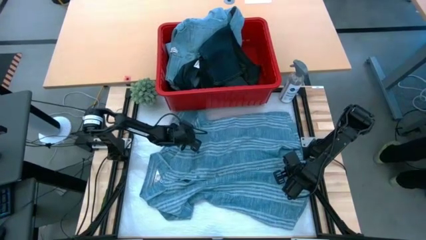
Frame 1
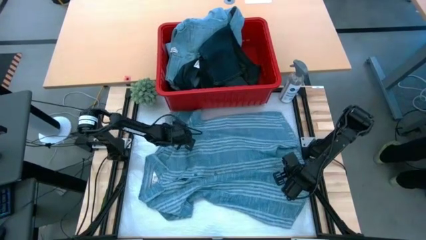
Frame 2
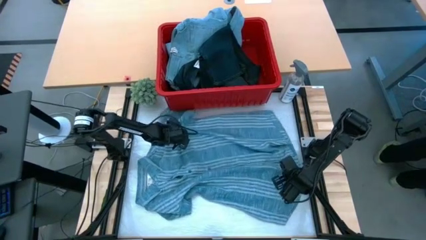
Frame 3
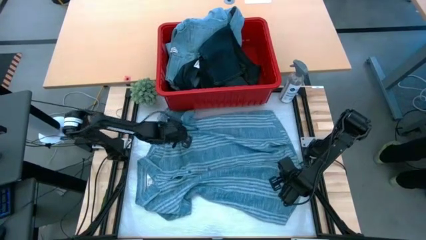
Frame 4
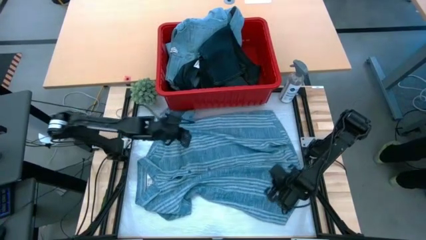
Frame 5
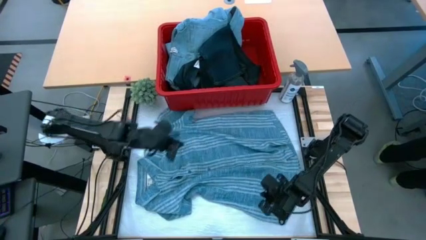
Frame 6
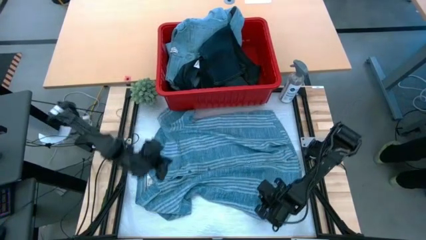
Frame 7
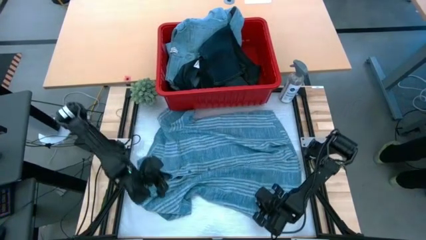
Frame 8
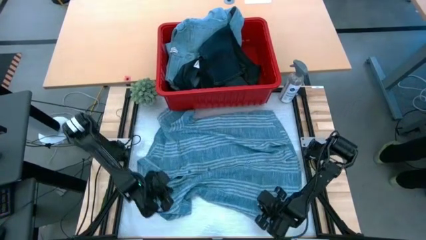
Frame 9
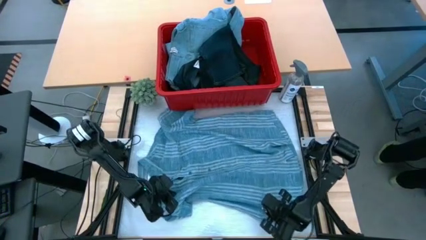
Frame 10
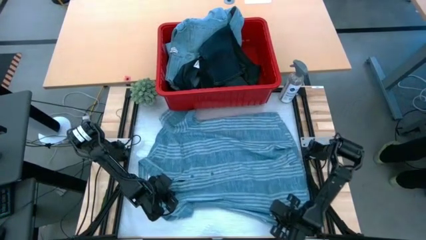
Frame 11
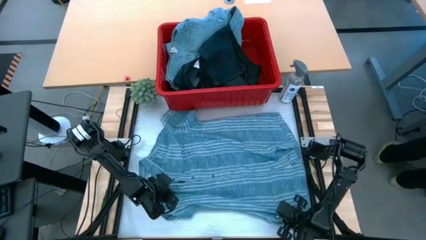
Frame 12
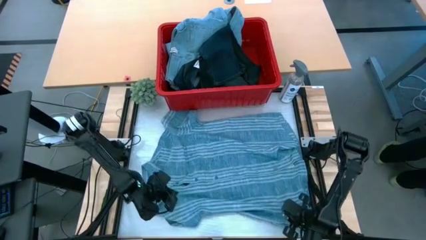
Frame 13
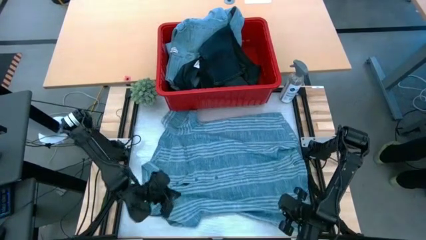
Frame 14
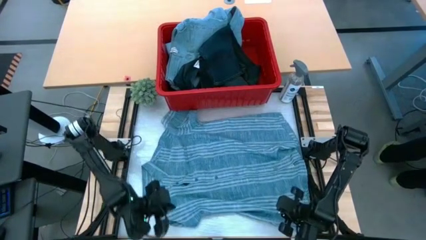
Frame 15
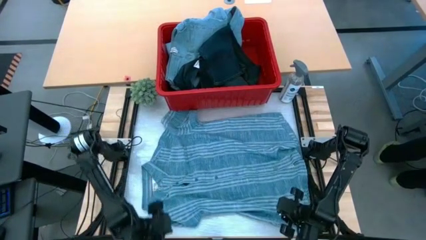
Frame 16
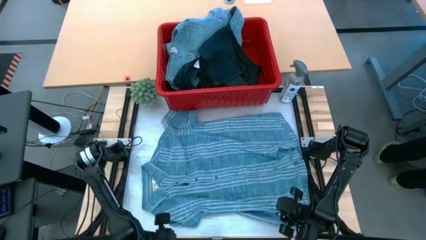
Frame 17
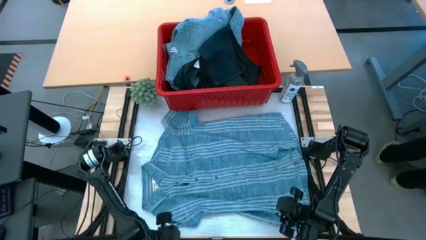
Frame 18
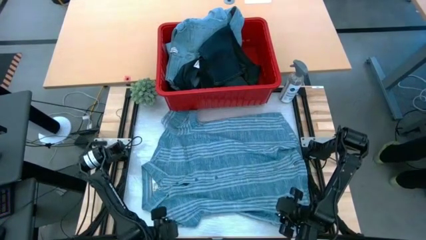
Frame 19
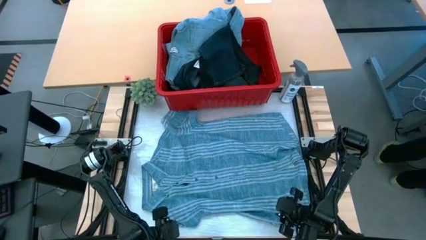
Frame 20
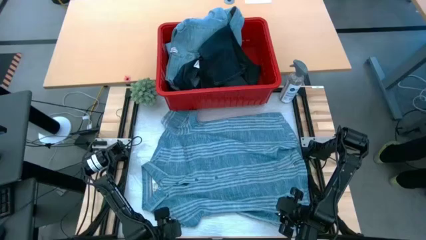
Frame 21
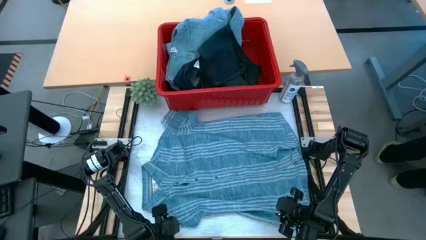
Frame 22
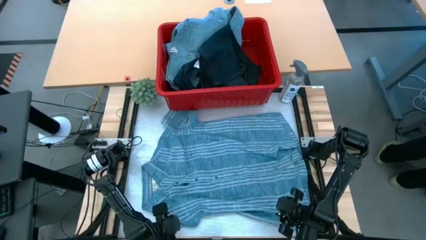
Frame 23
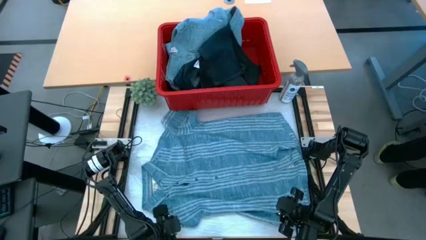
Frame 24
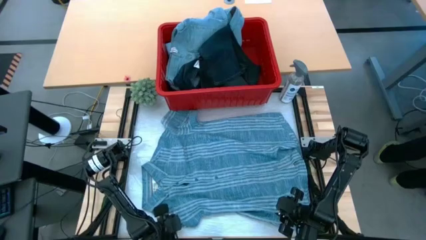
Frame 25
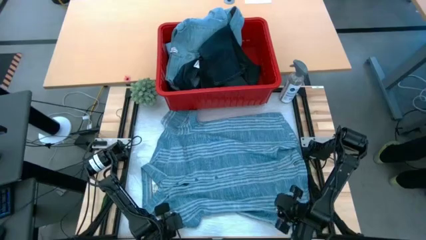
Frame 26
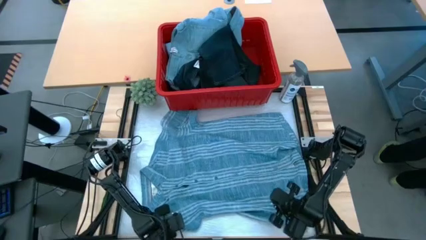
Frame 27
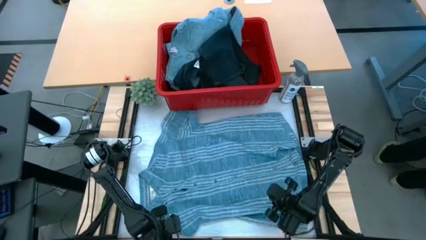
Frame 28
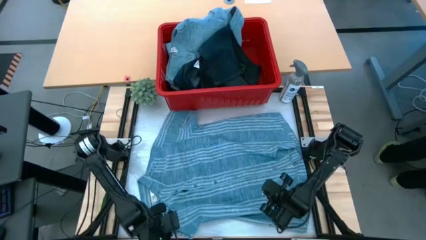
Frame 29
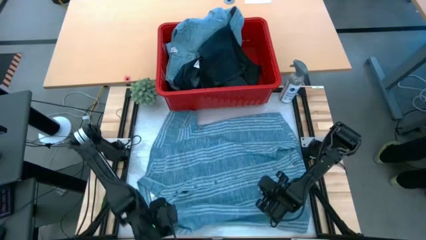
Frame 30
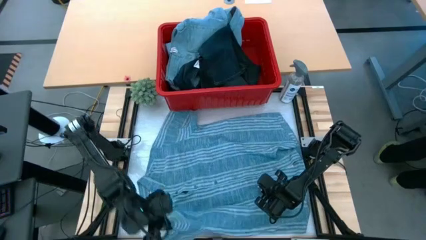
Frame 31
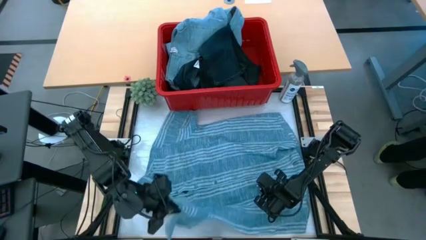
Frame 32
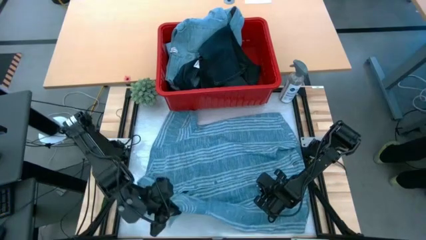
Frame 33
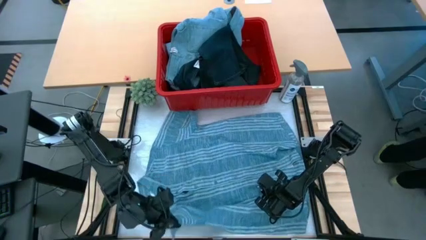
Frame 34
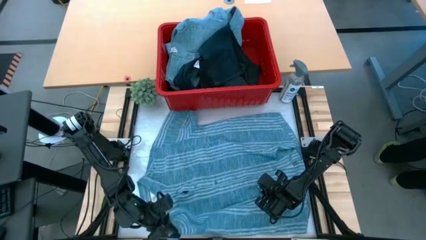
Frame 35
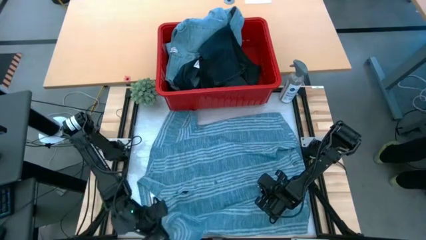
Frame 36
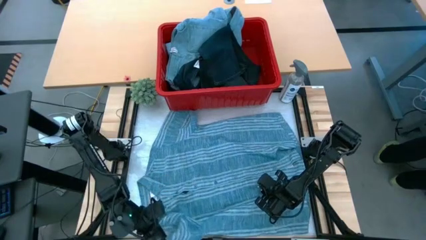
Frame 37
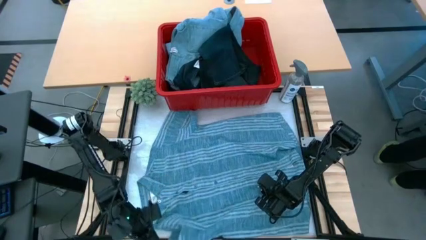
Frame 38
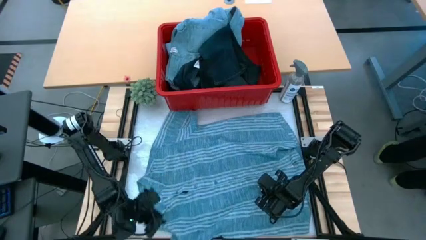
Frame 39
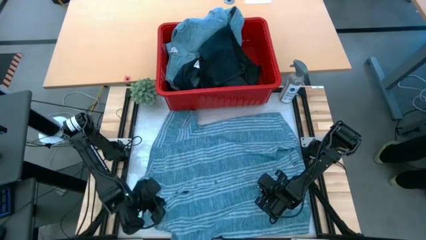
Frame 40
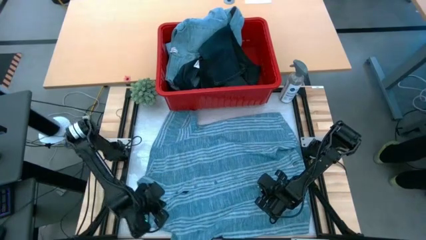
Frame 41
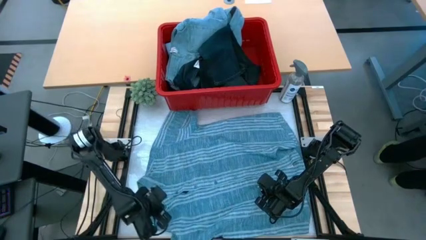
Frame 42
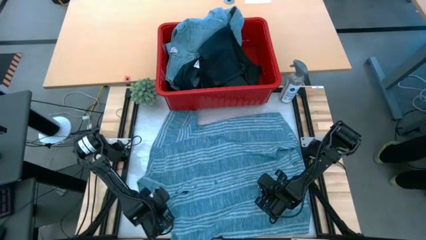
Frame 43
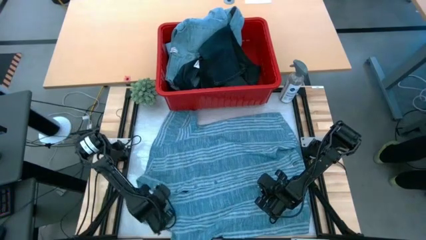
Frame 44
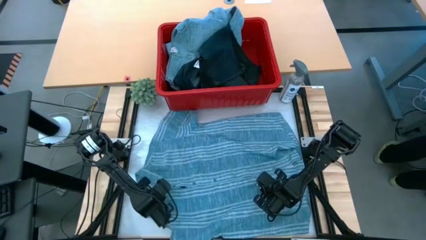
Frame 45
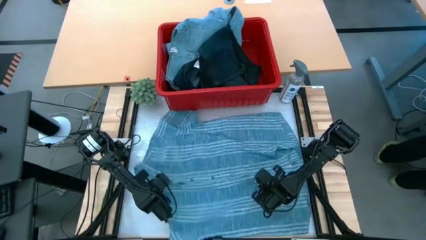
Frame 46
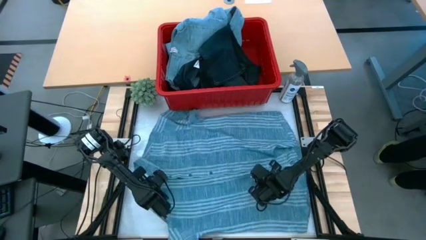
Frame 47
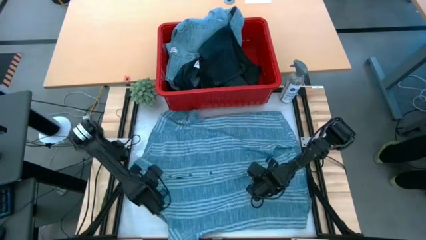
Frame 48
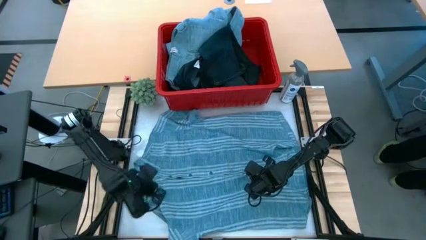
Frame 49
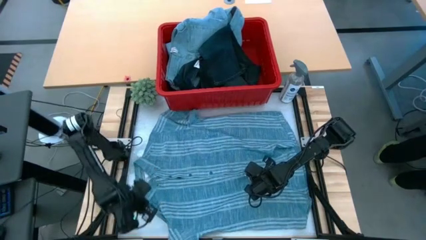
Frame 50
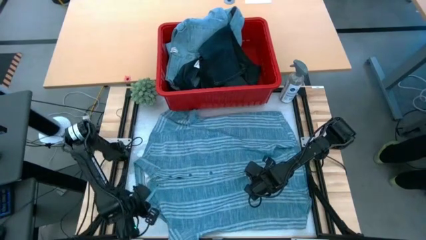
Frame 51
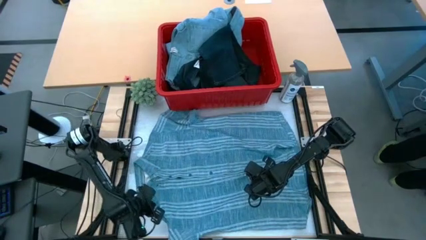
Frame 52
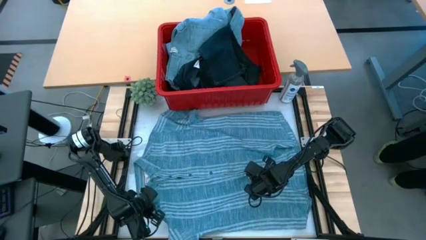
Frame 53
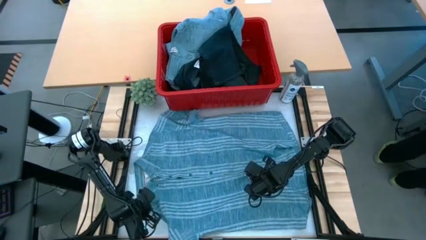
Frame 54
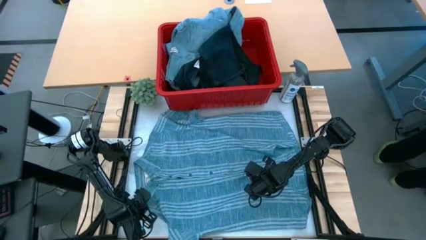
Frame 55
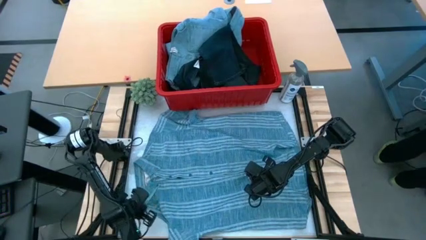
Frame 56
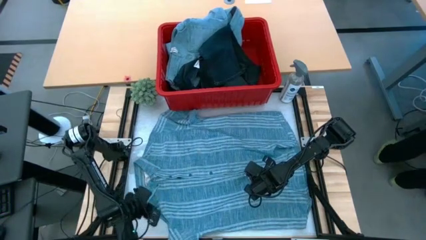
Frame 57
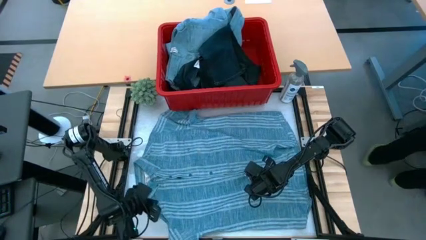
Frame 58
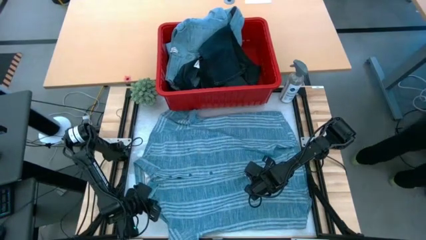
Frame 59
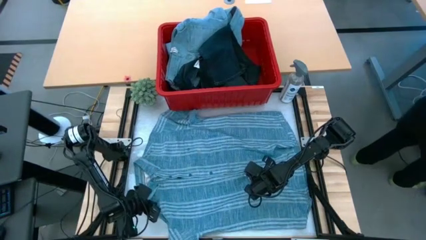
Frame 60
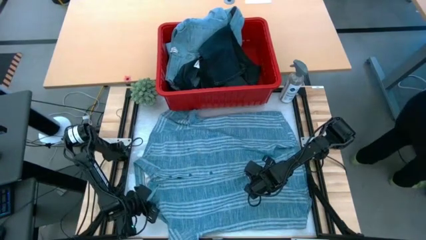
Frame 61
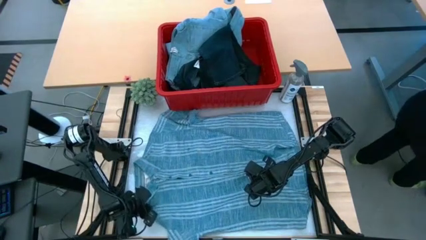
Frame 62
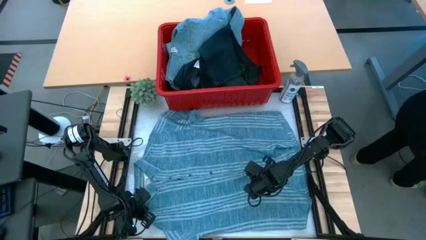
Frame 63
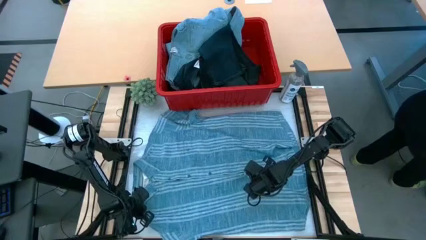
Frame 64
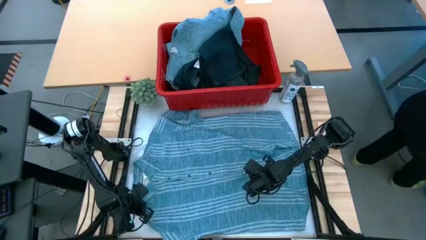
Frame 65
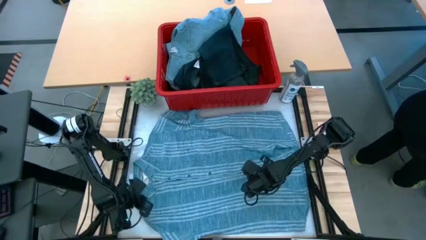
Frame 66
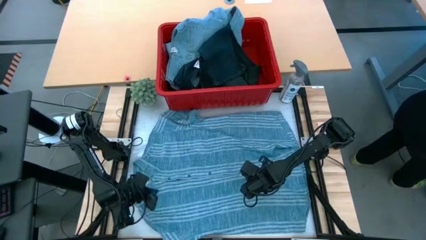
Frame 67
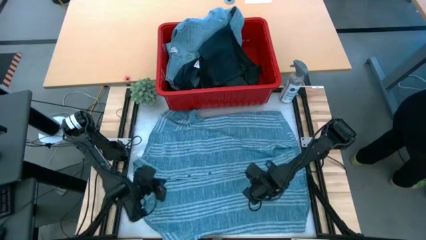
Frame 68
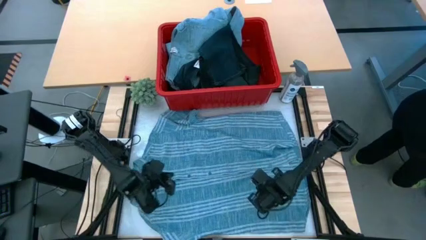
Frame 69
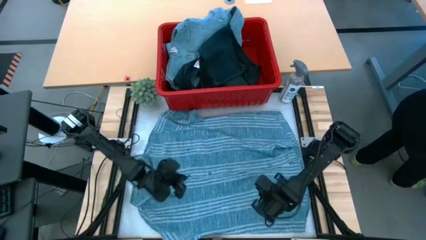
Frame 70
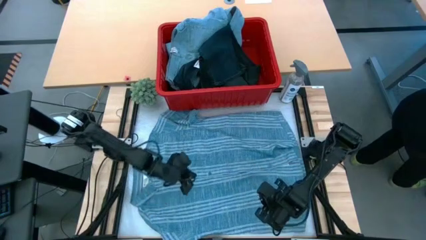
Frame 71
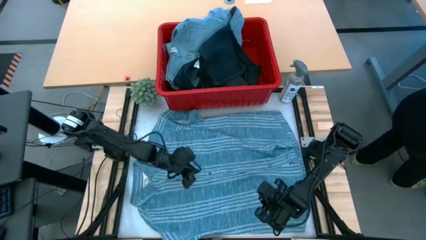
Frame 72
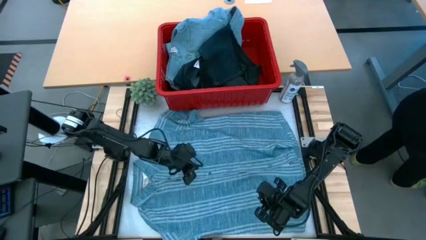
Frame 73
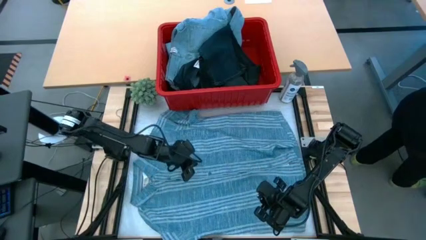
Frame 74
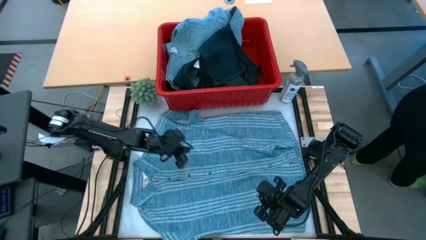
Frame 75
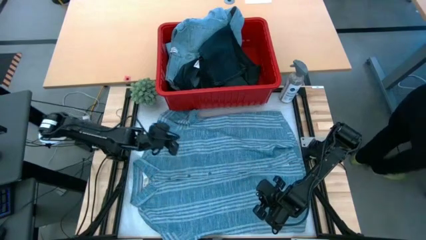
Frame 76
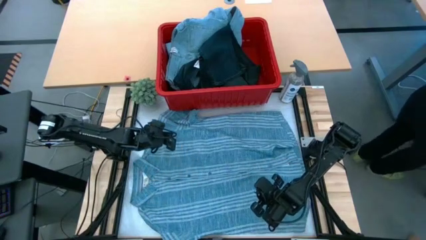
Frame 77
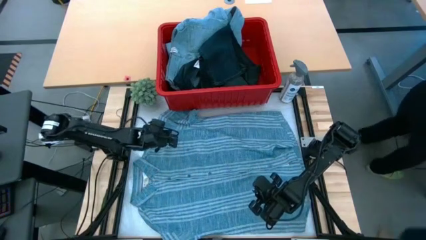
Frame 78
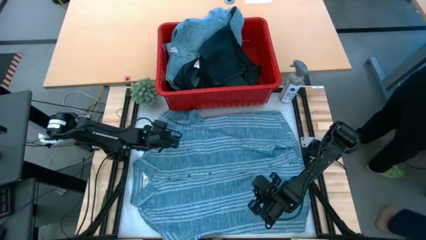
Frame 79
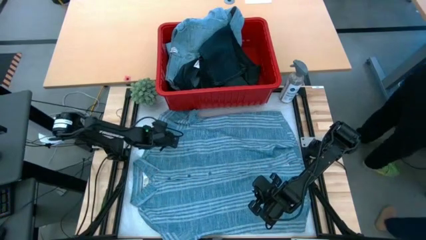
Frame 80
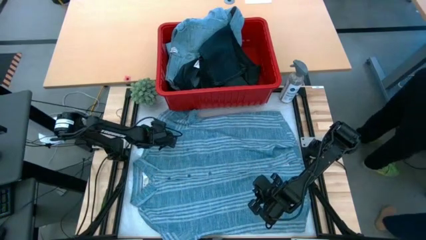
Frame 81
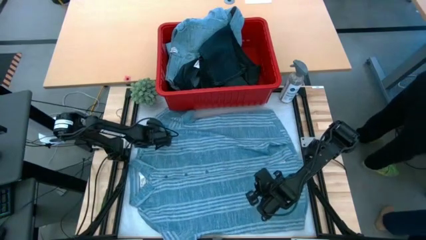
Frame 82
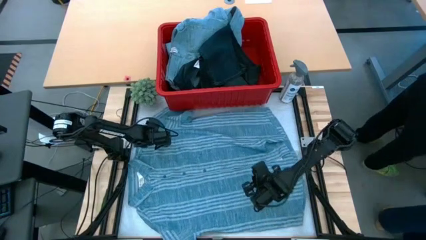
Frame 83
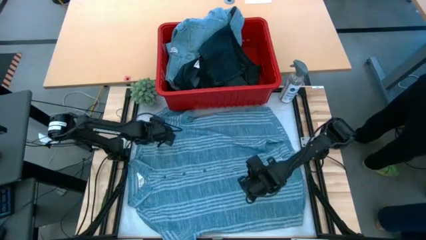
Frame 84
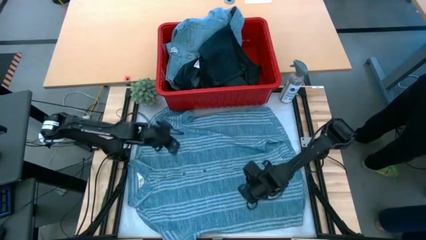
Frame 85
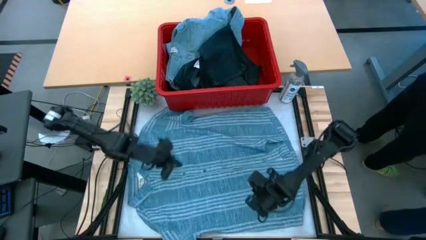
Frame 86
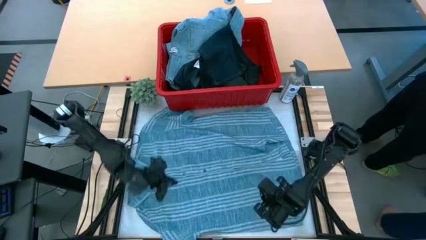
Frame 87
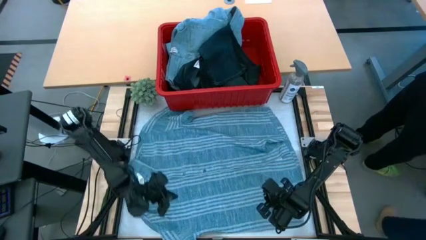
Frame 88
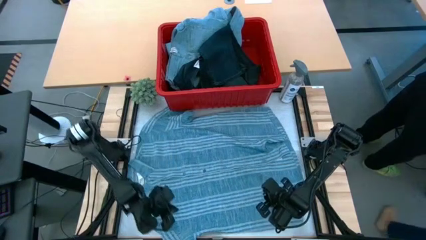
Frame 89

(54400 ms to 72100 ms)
Task: Fold Laundry from Bin
Fold the blue polo shirt
